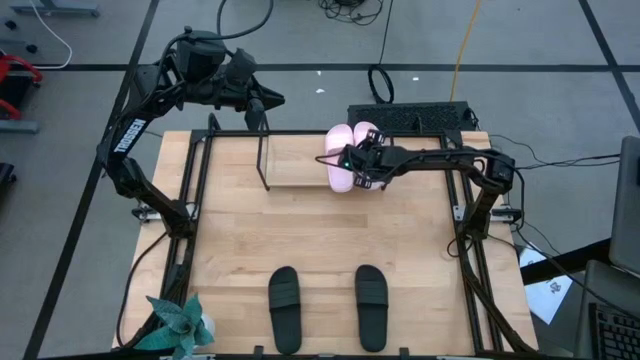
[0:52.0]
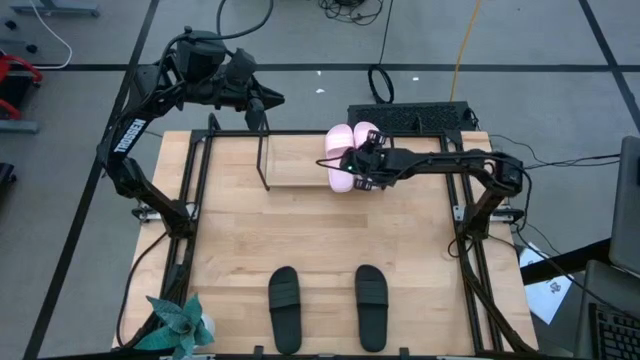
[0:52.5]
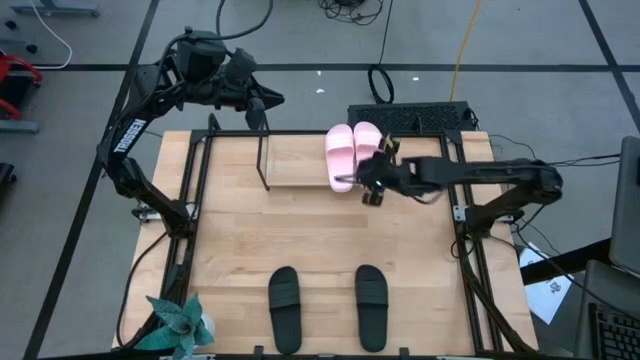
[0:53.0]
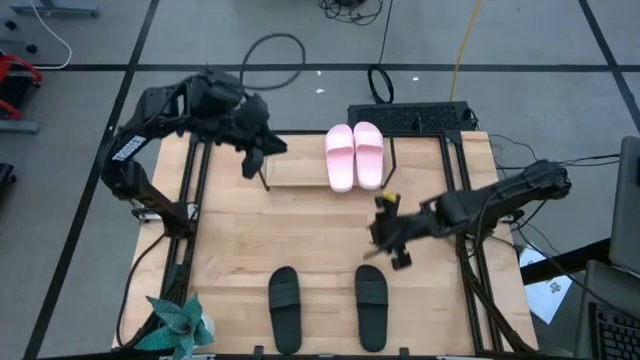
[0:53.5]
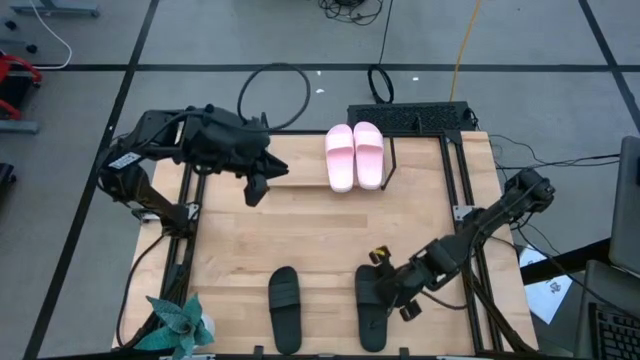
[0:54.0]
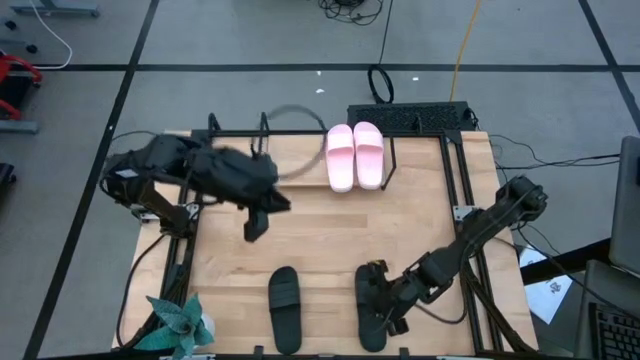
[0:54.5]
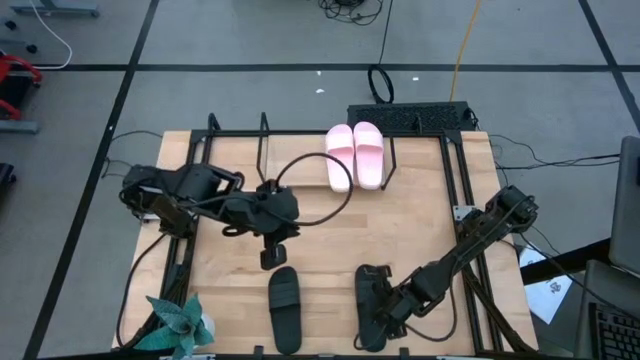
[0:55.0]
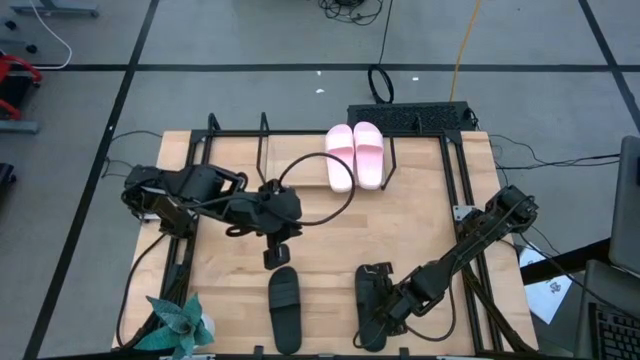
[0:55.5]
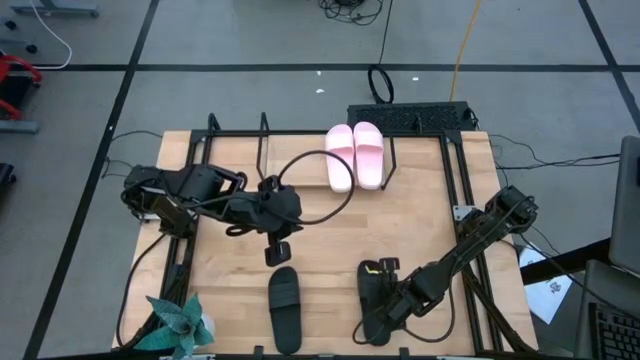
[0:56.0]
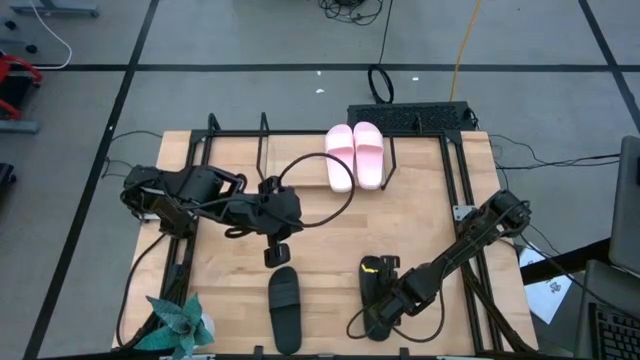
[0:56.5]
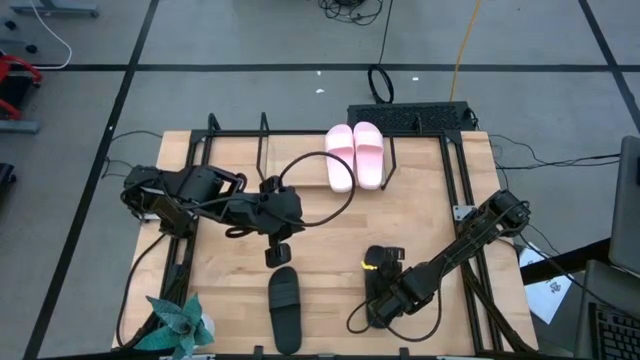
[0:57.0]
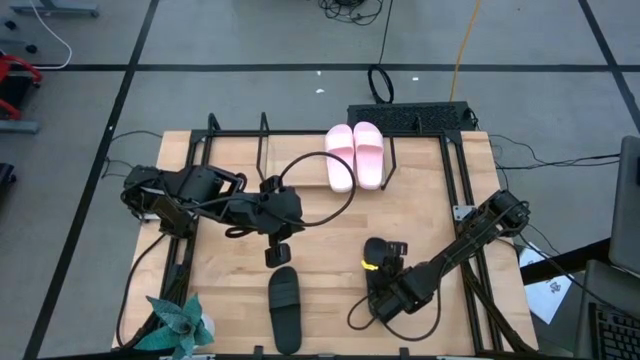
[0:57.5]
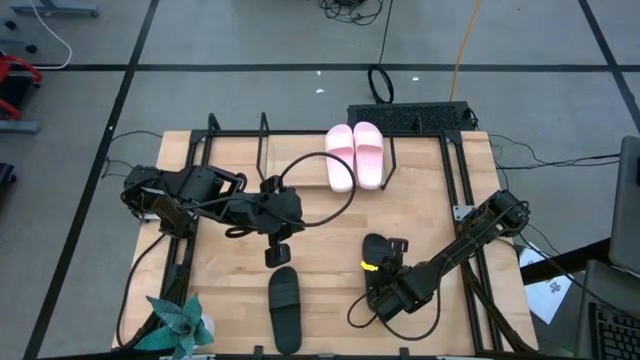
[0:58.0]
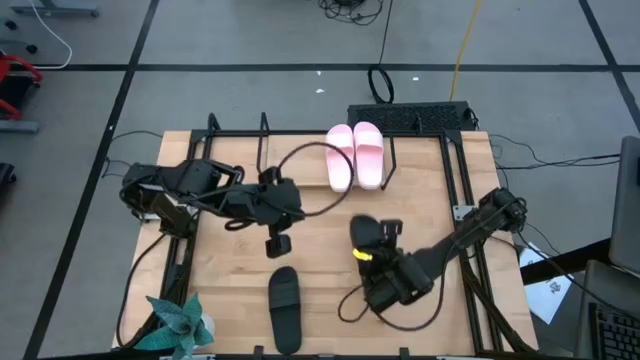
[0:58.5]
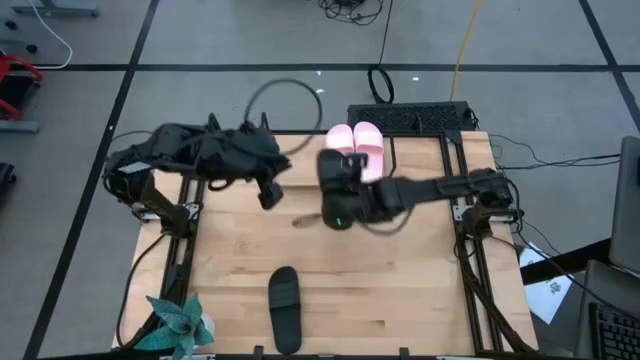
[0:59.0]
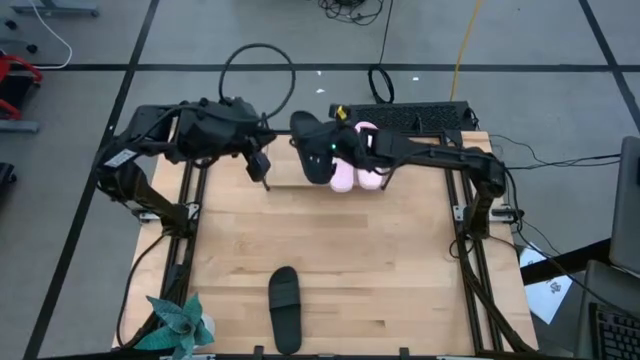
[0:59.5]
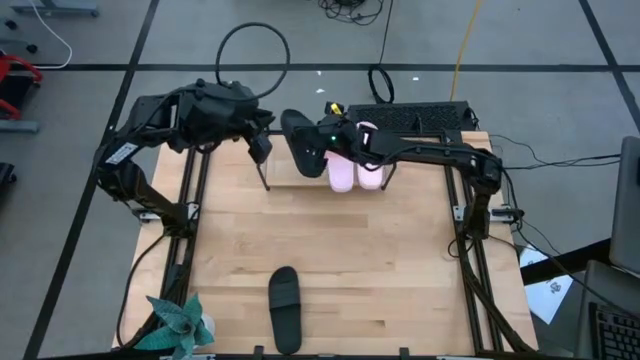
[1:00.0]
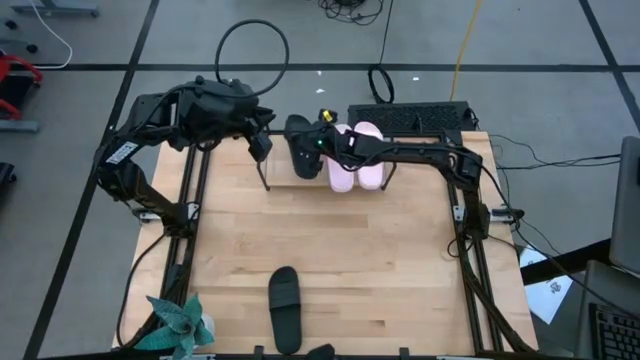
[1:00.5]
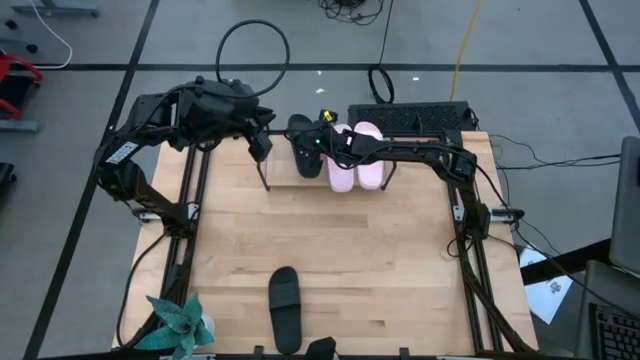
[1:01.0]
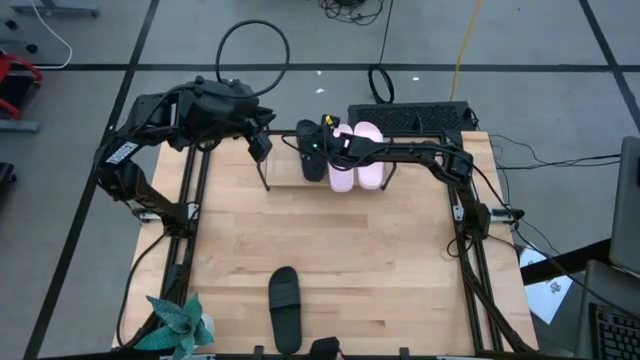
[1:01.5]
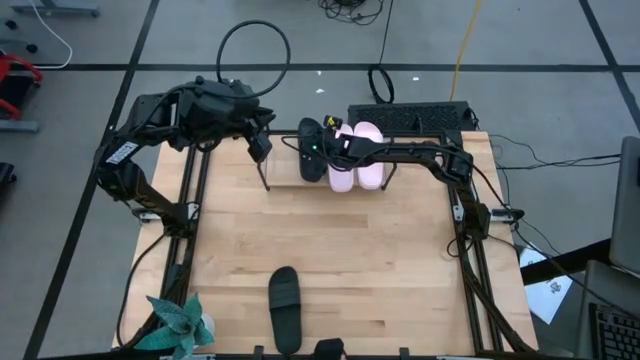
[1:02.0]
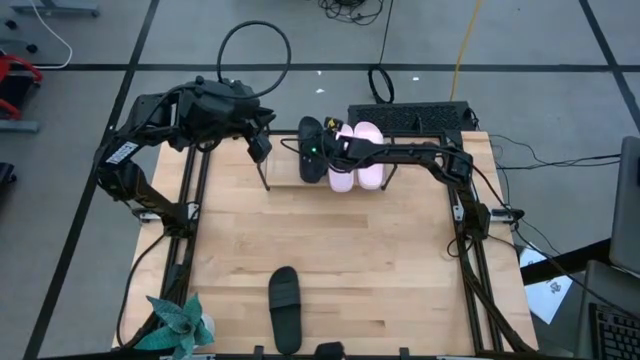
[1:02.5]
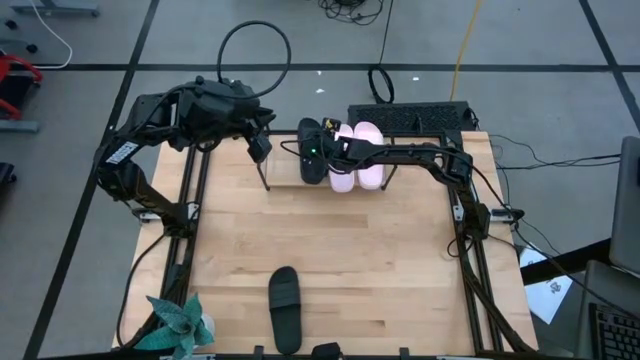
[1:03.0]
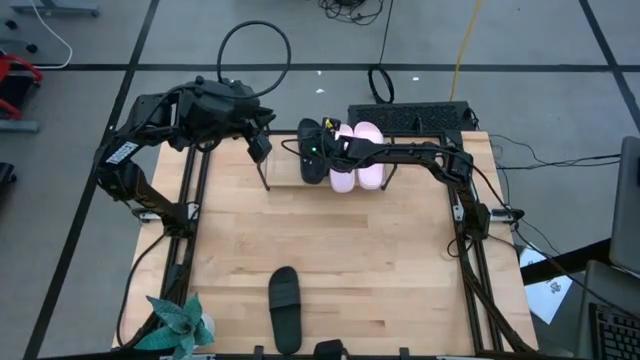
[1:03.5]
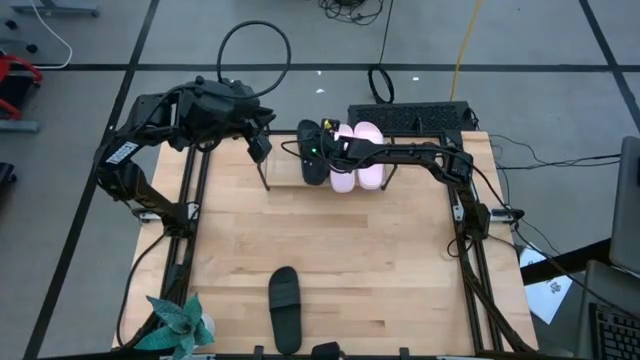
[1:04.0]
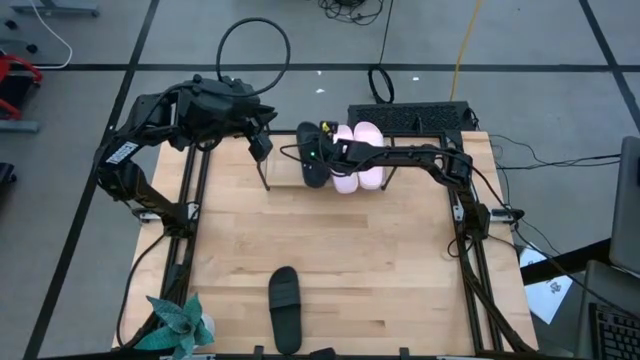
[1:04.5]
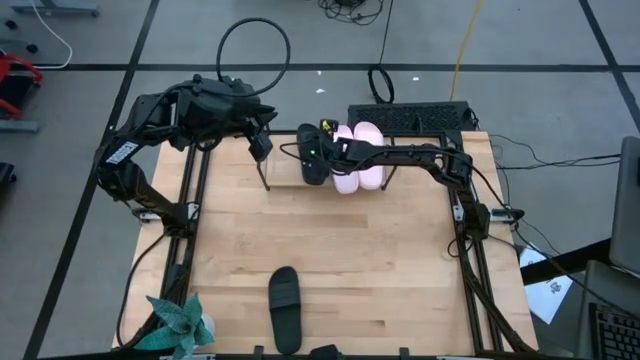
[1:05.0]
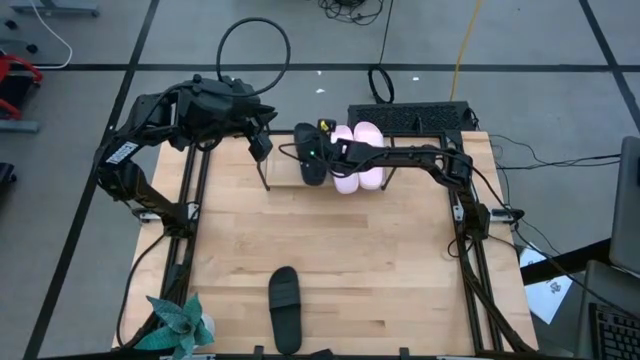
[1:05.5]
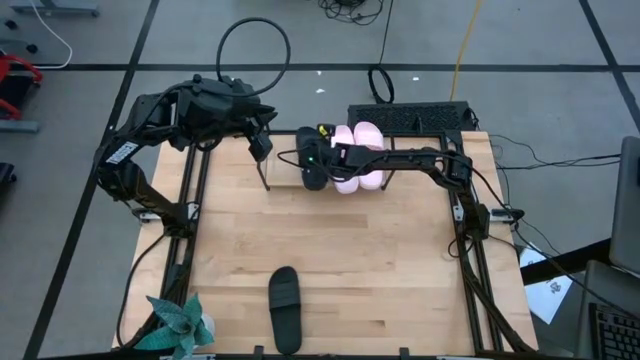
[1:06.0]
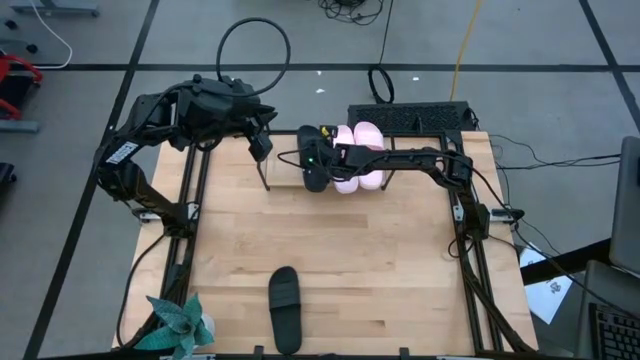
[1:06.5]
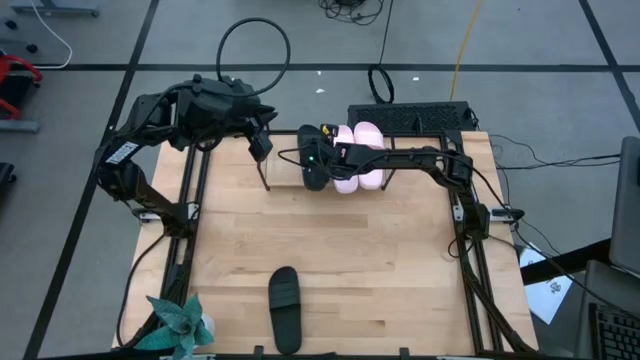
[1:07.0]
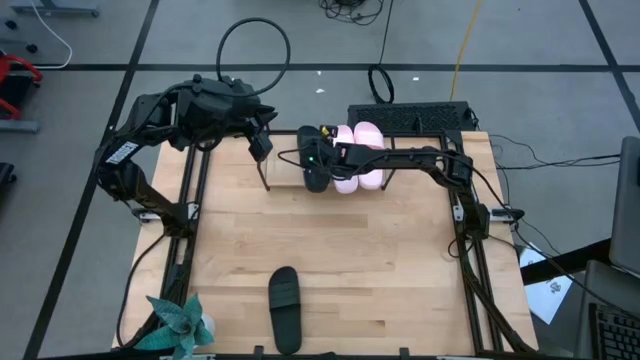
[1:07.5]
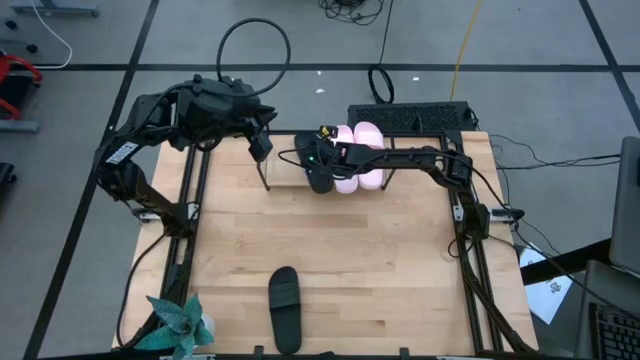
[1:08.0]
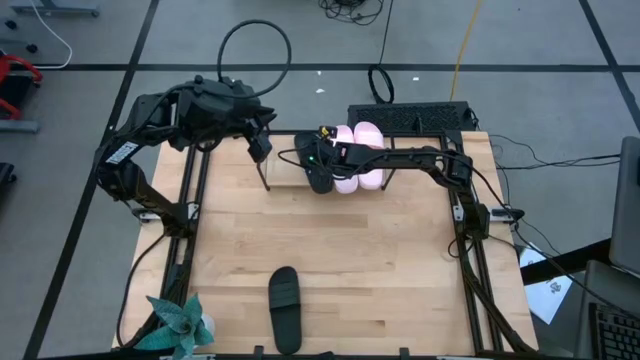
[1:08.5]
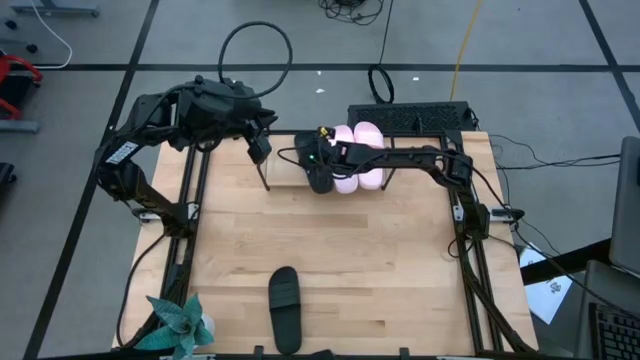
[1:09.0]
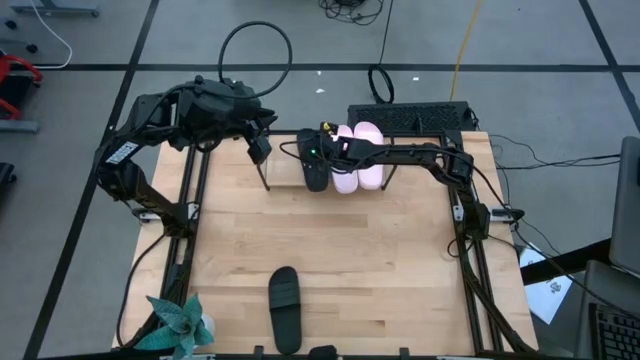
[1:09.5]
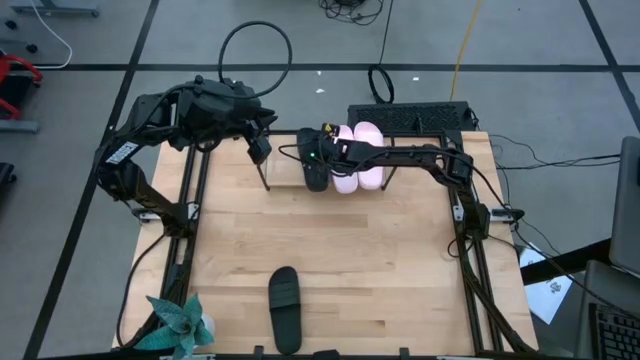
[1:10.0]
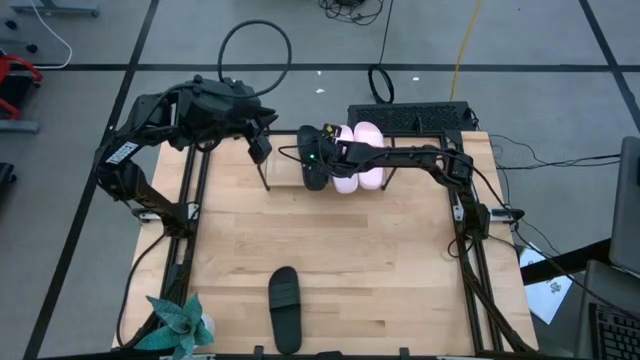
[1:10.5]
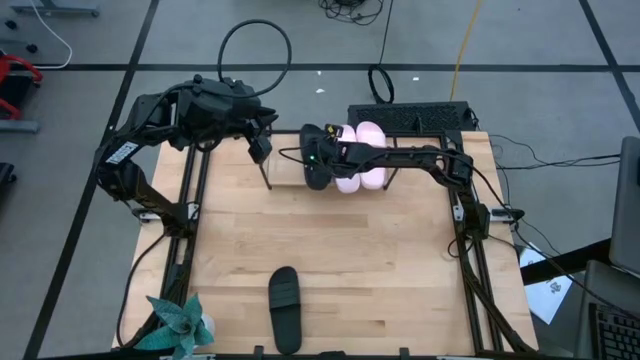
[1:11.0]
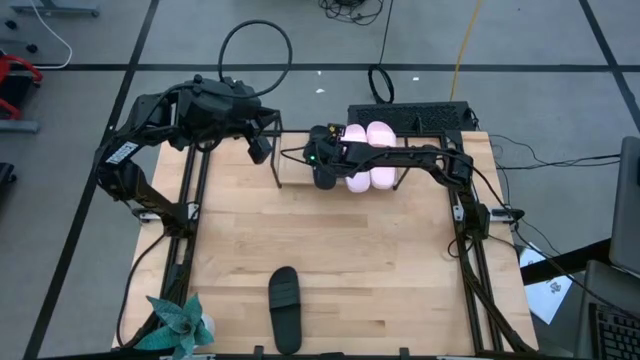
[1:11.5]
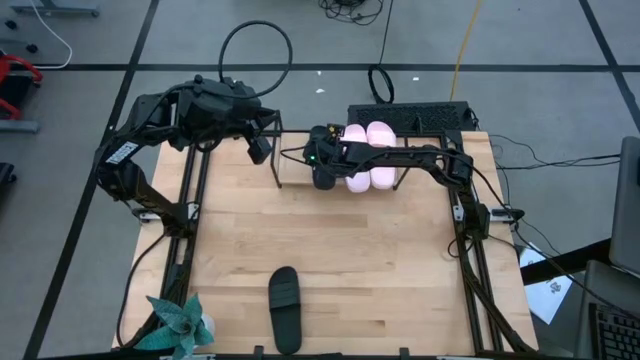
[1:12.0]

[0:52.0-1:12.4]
Task: Pick and place slides into the shelf
Put the right black slide on the shelf

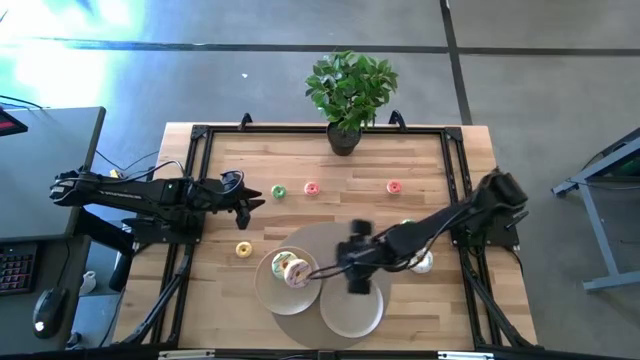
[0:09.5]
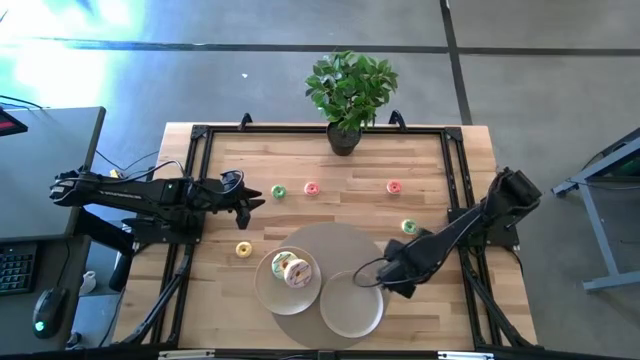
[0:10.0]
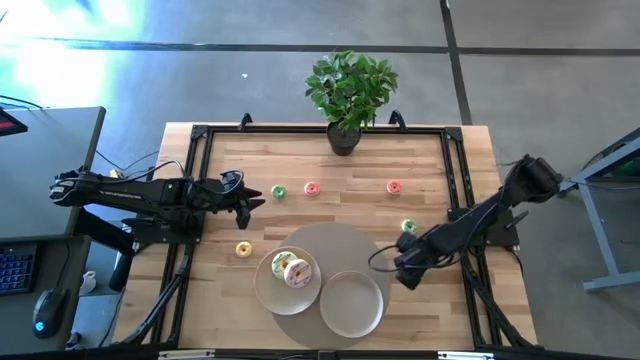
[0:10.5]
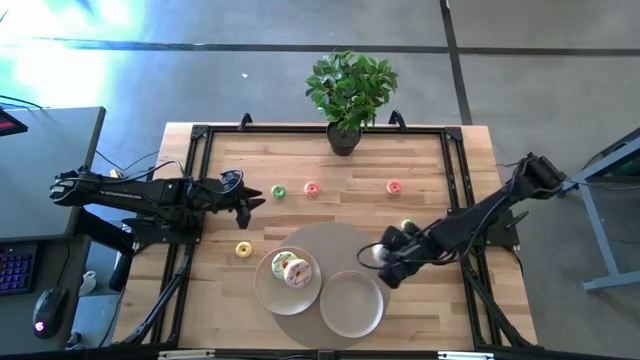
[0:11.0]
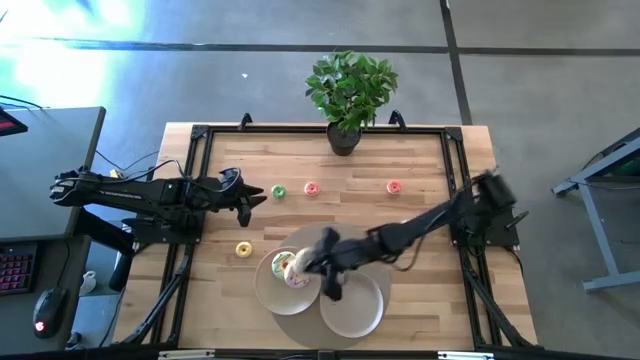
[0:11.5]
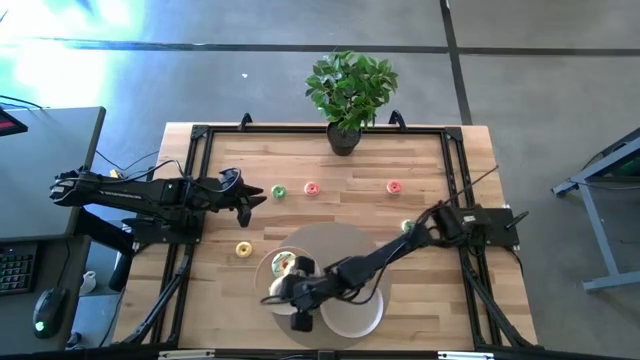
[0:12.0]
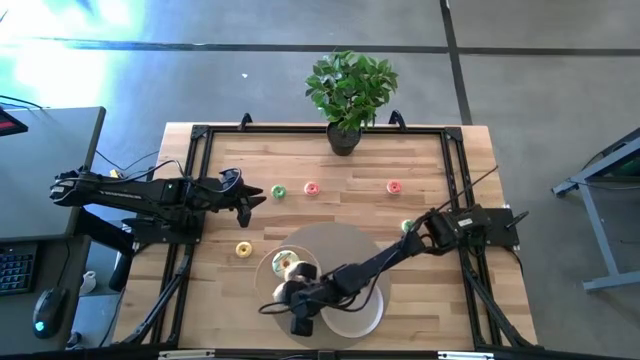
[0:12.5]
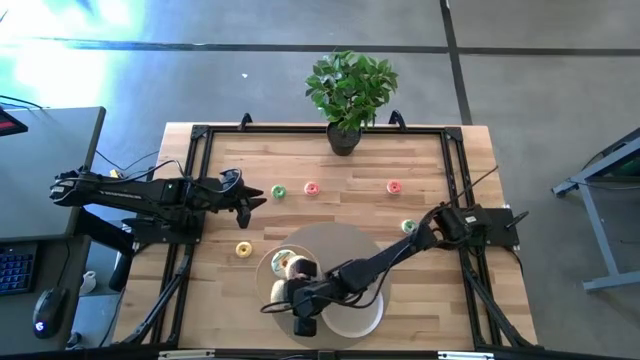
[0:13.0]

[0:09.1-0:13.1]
Task: Pick & Place donuts
Put the large white donut on the left white plate
